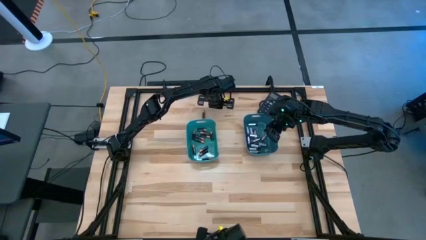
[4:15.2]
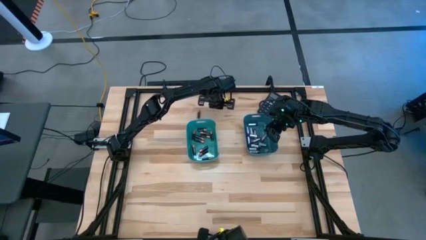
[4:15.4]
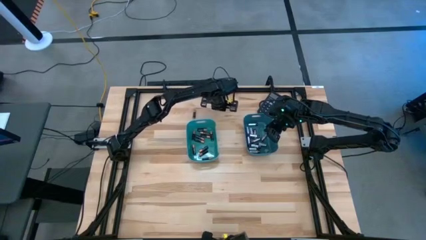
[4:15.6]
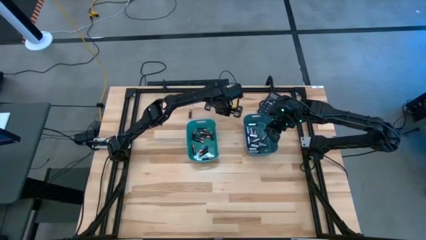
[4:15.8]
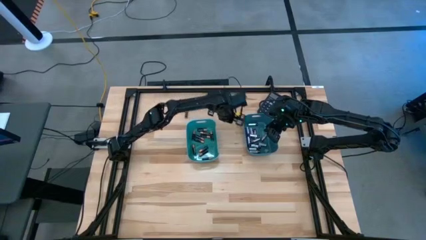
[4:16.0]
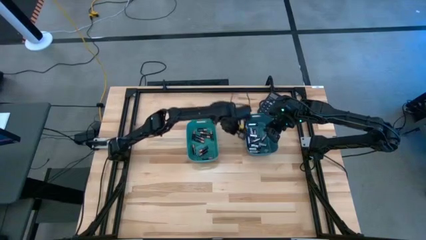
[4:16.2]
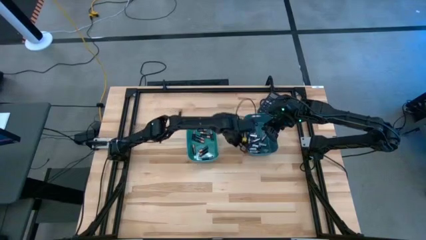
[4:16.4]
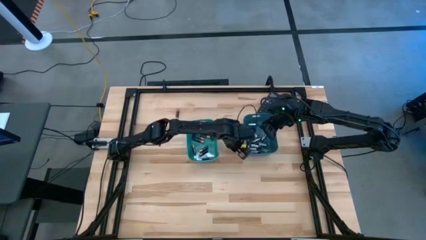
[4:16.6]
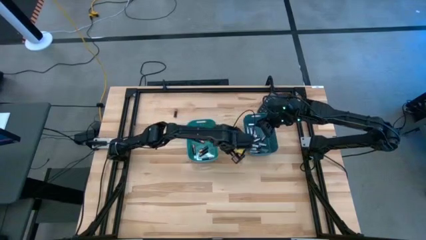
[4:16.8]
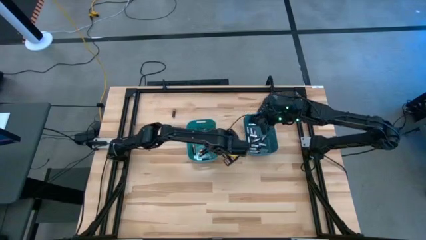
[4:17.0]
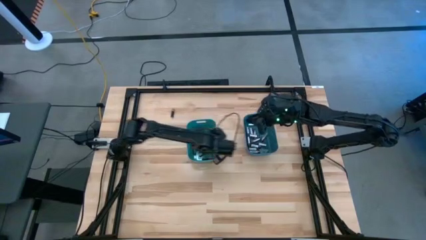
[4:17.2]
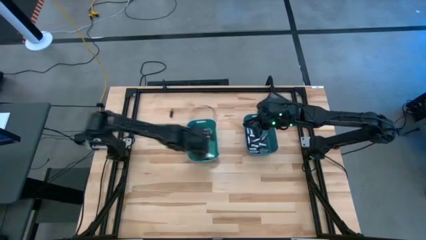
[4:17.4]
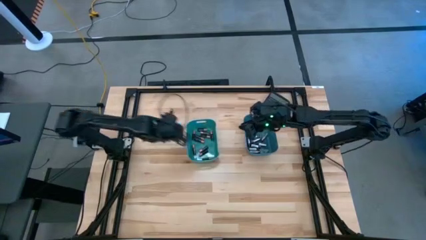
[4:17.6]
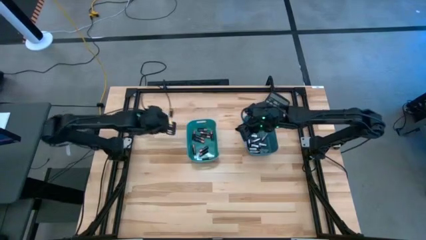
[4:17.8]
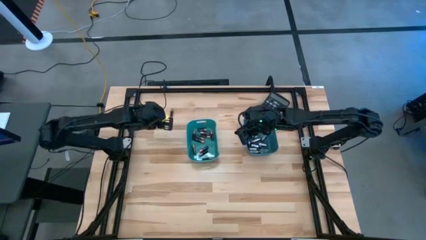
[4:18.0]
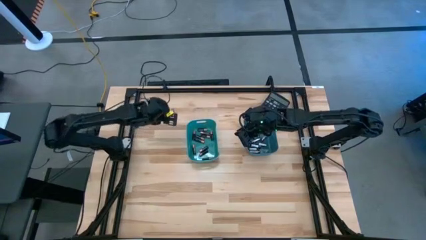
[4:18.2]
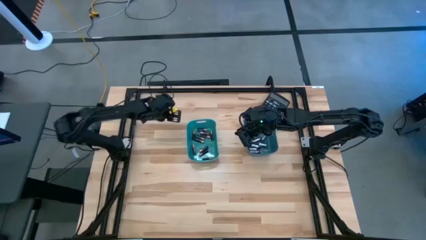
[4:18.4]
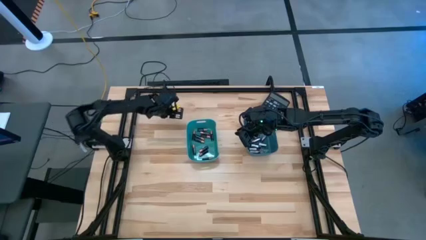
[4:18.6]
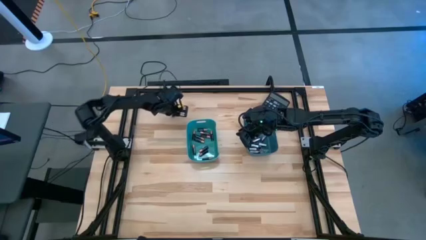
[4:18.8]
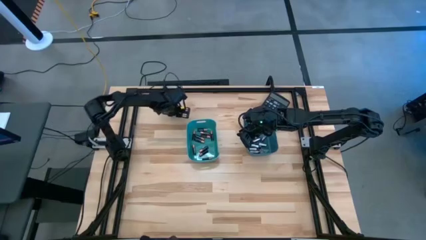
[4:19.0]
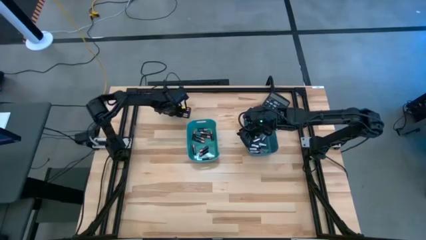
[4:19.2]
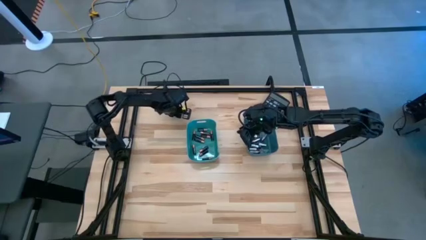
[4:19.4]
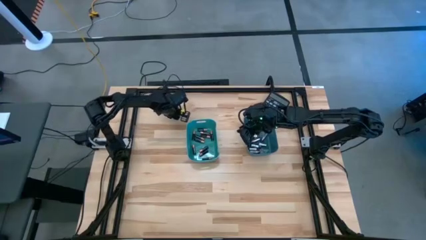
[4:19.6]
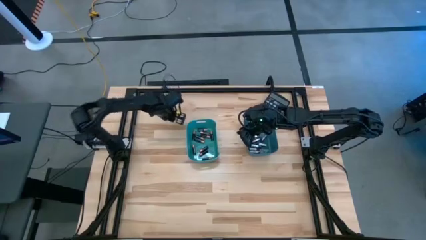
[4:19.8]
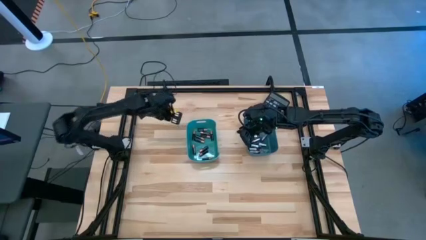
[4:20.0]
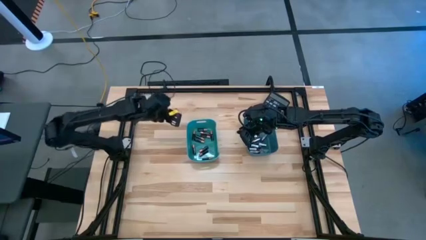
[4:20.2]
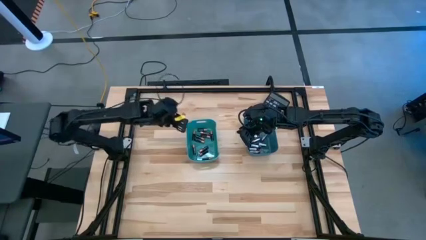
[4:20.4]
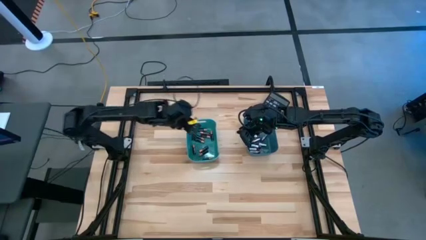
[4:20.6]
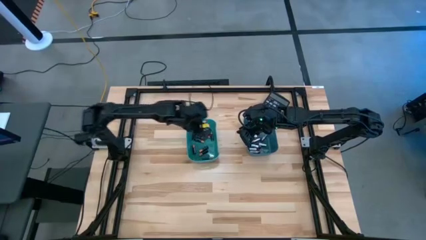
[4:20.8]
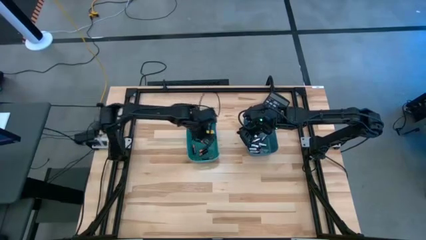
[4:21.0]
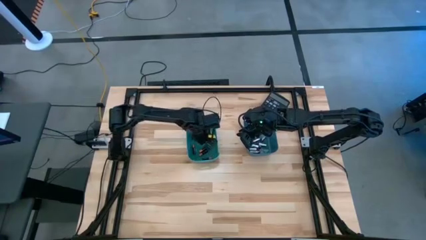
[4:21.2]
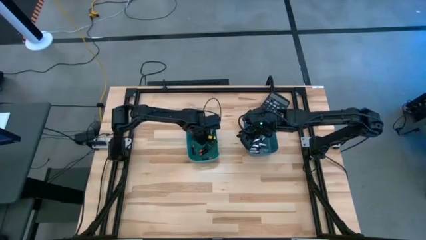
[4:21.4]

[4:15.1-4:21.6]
Task: Sort batteries
Put the black battery into the blue bin

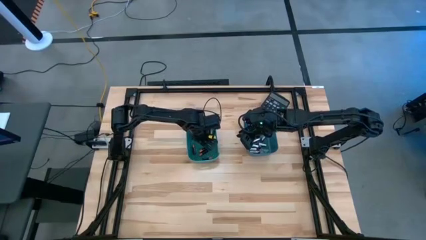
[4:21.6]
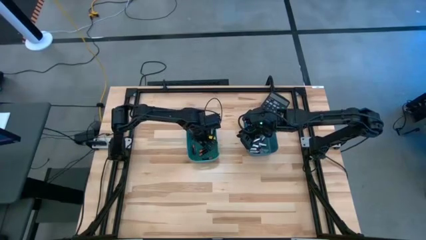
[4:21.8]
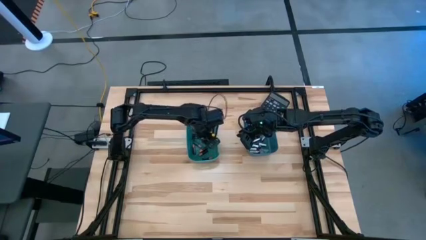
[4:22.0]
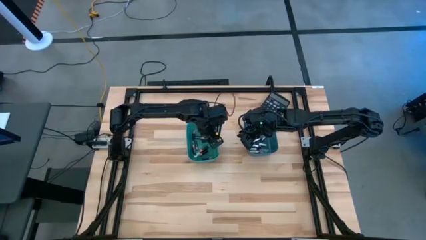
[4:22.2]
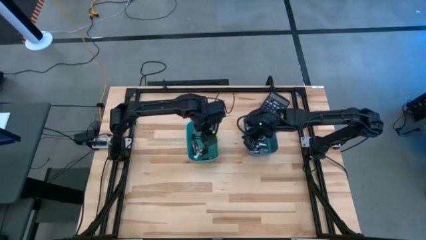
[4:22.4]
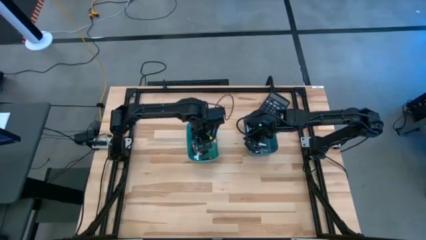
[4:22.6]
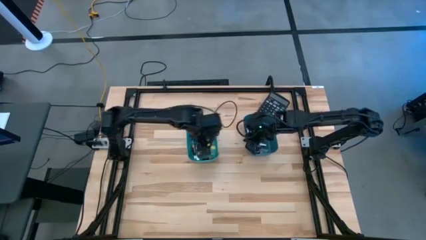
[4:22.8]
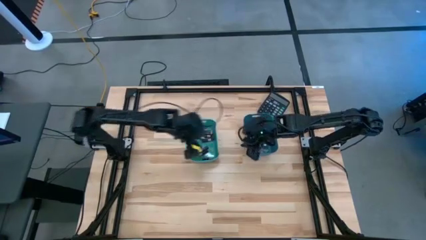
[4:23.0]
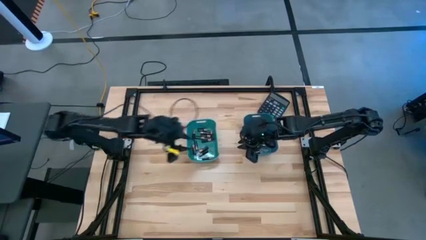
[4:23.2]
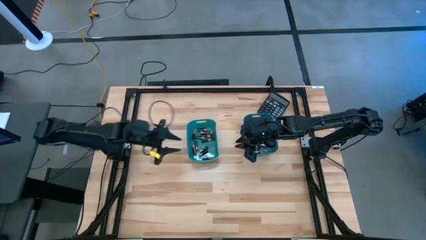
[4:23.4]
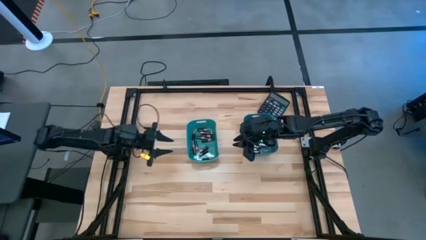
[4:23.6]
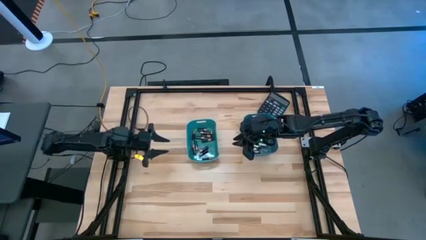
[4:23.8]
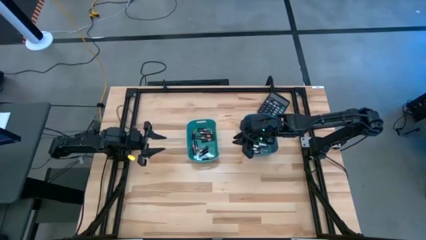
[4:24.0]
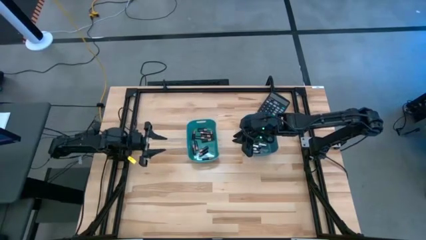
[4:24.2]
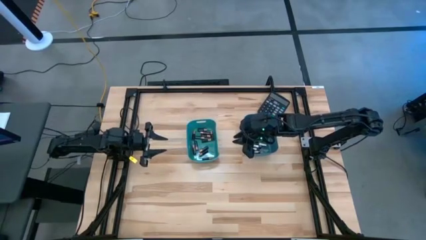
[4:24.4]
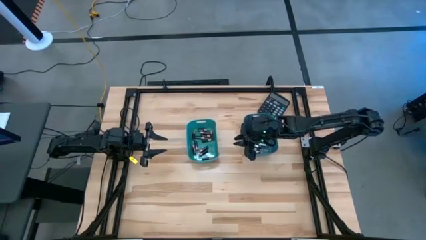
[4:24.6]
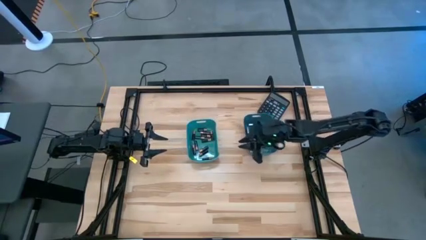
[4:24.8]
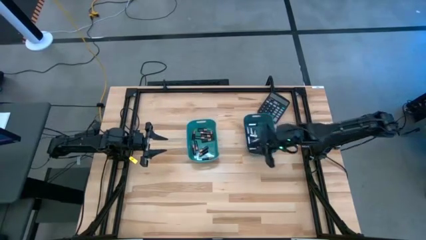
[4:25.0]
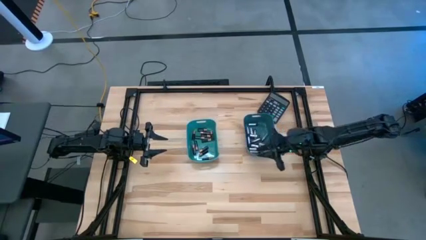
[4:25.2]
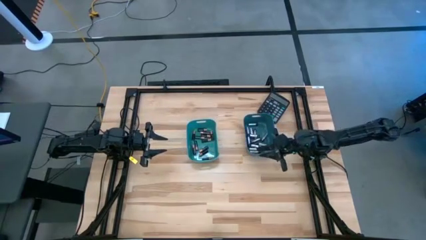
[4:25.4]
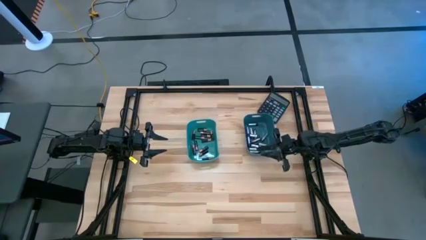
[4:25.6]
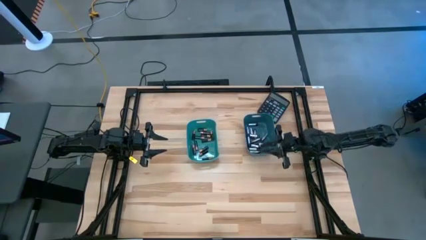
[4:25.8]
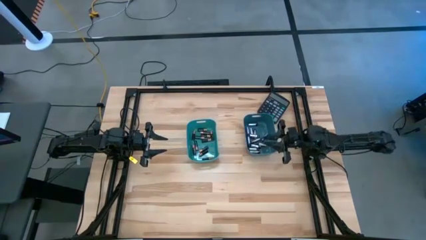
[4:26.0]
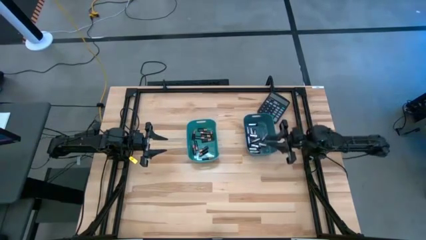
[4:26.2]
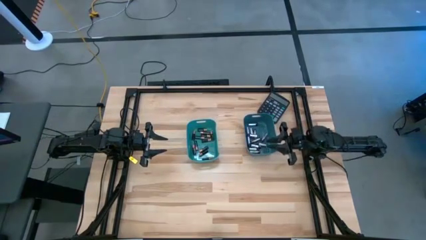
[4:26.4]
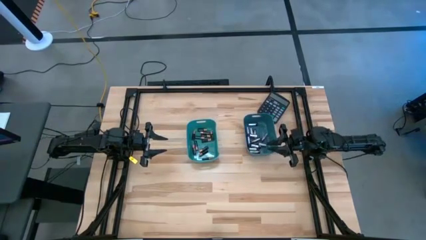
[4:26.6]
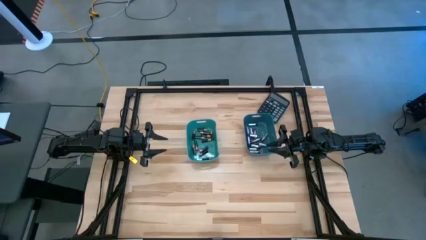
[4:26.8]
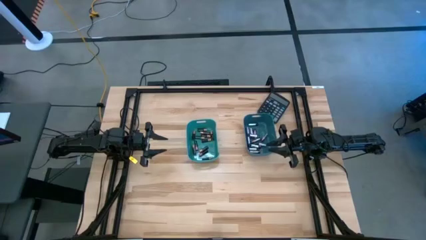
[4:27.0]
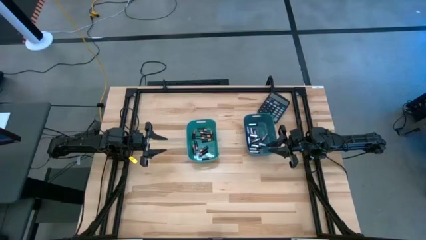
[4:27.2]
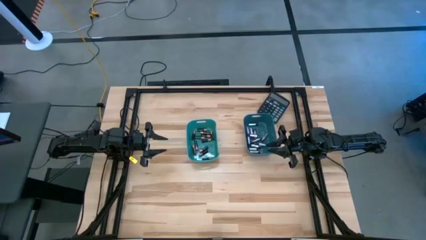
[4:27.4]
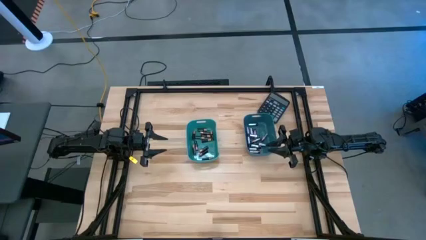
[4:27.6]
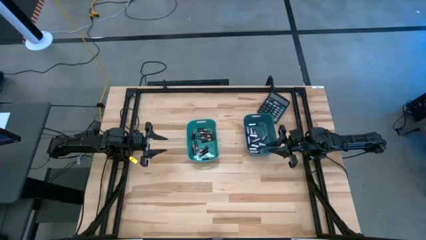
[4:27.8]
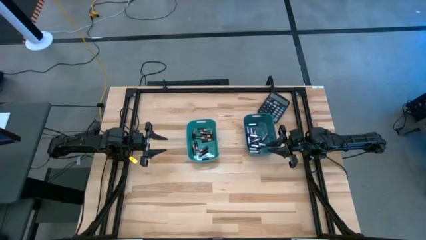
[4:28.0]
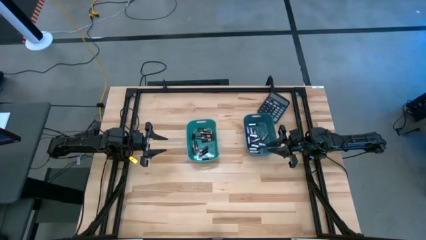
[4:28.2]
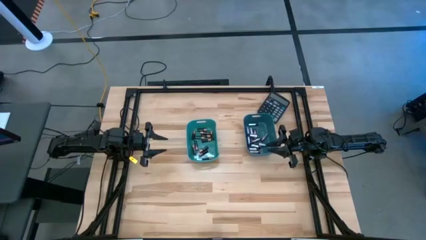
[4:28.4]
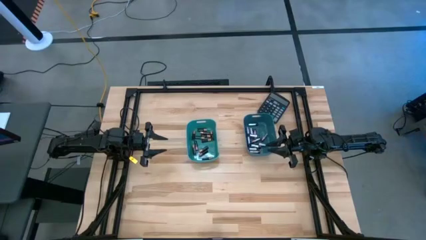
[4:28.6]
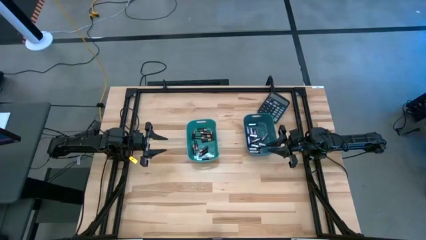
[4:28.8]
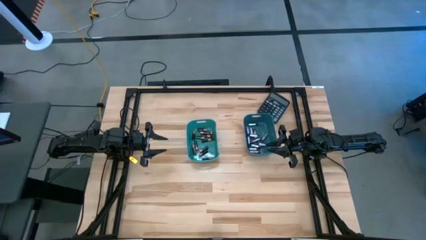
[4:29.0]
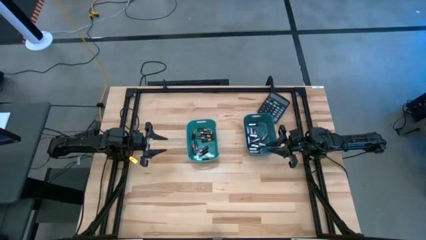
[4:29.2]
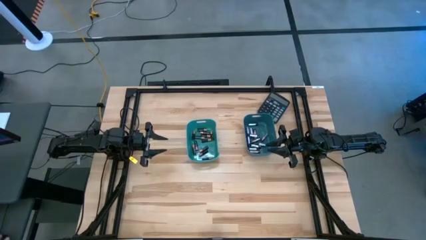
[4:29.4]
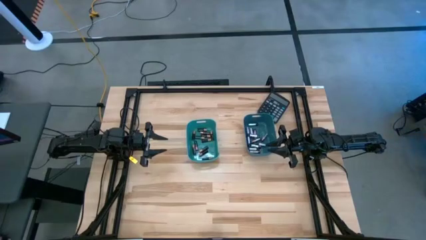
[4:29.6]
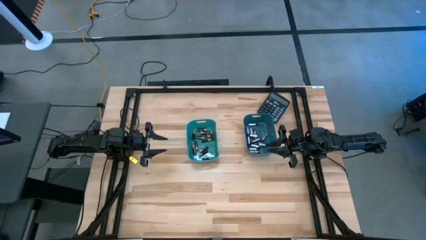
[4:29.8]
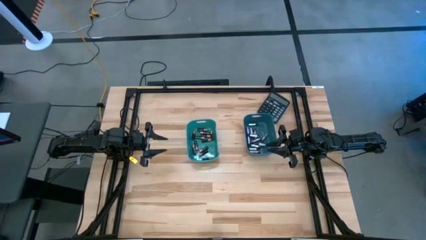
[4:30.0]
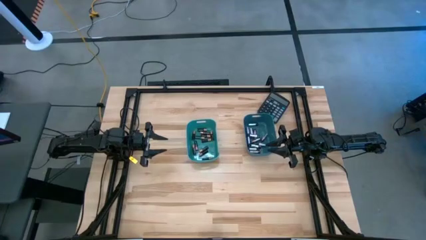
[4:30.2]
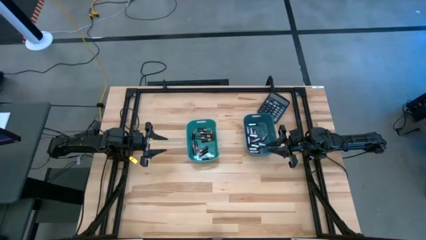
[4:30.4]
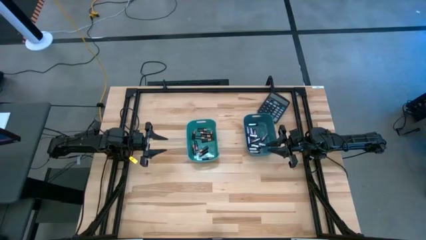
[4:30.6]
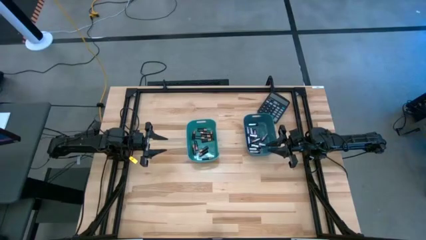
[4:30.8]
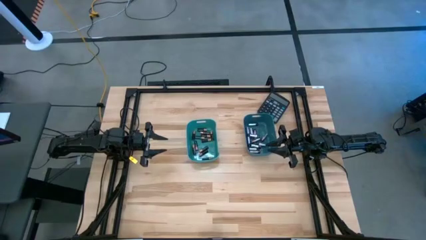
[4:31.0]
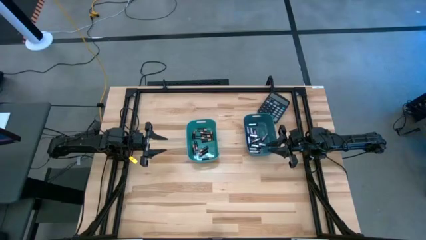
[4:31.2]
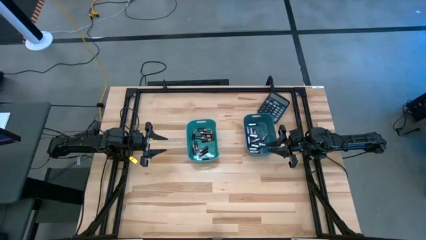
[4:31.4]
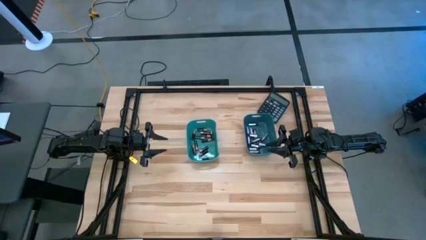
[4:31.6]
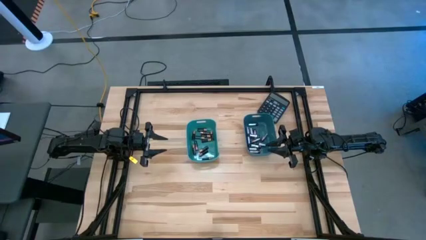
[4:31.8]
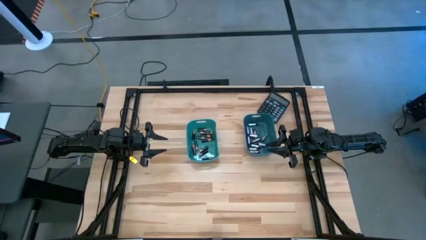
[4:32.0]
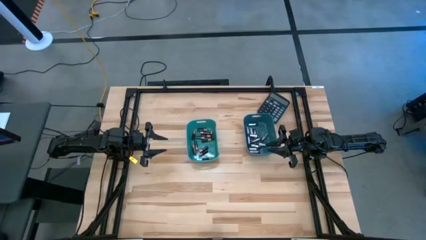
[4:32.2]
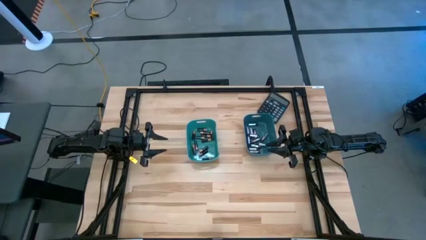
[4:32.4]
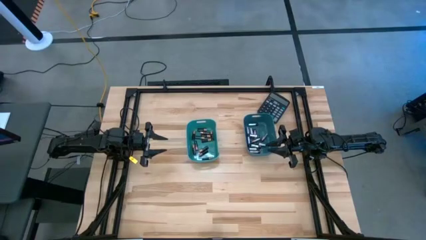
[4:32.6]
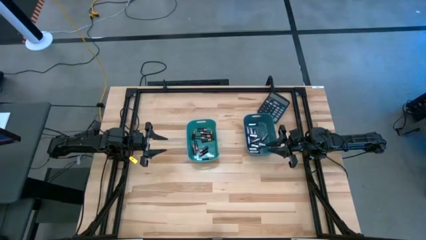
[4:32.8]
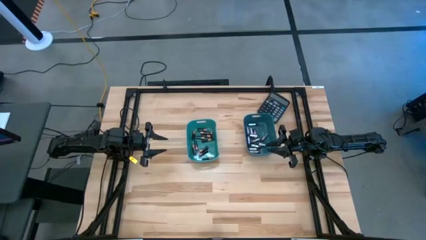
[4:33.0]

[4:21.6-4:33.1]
Return to Home Position
